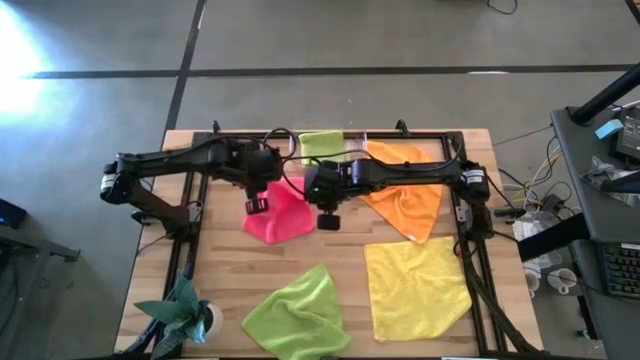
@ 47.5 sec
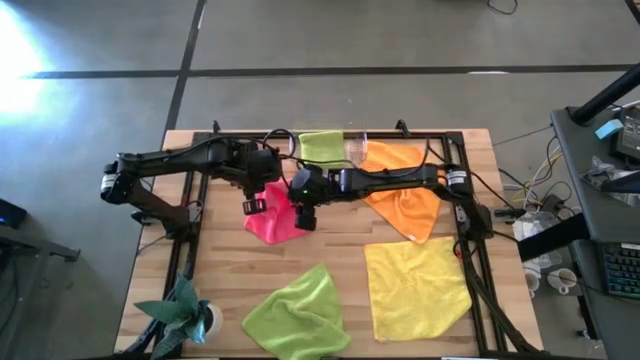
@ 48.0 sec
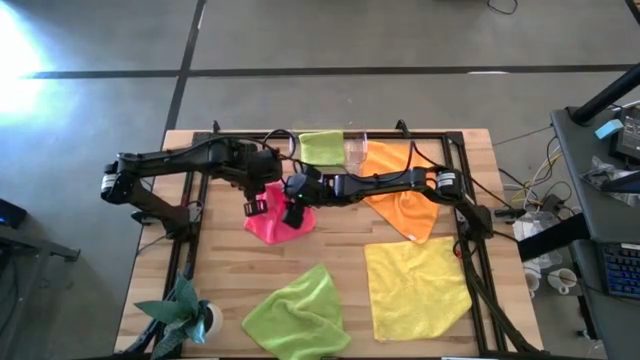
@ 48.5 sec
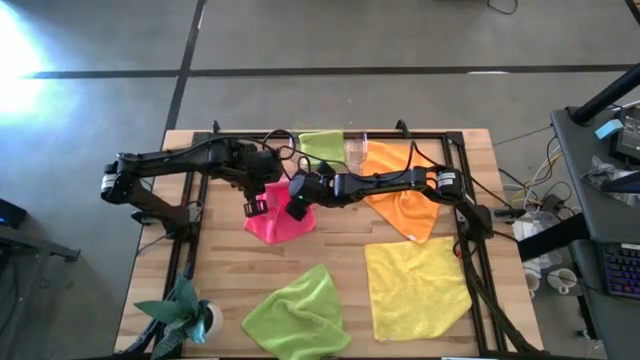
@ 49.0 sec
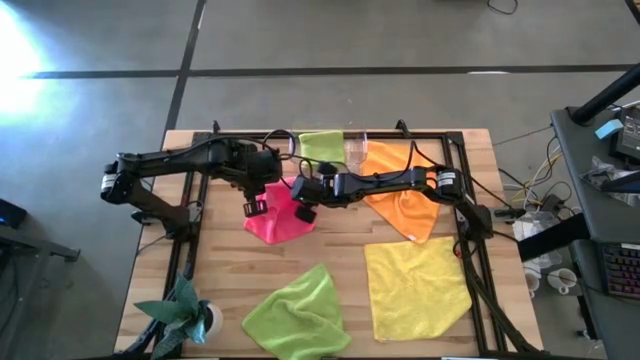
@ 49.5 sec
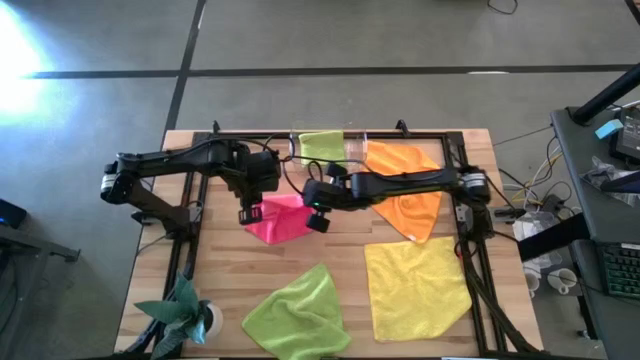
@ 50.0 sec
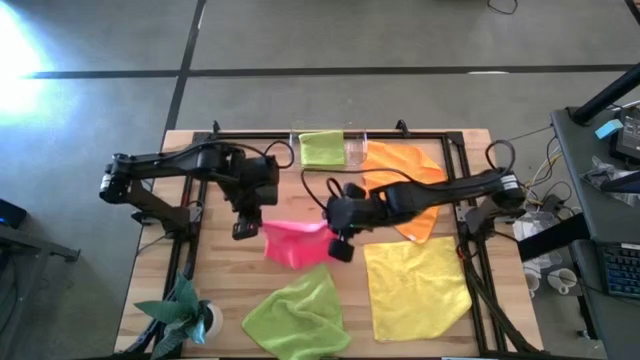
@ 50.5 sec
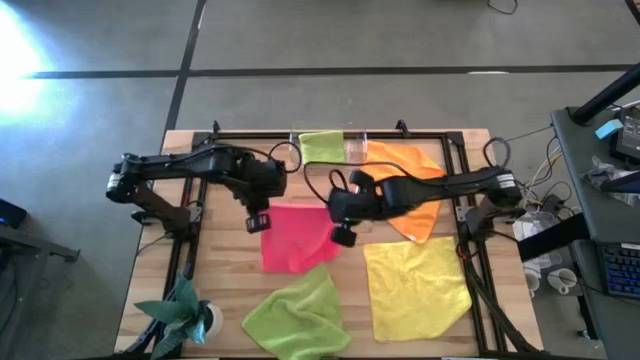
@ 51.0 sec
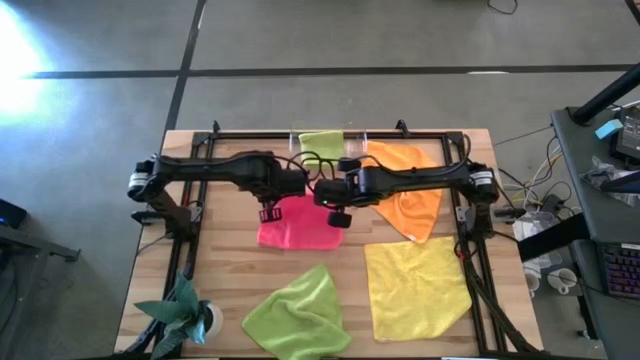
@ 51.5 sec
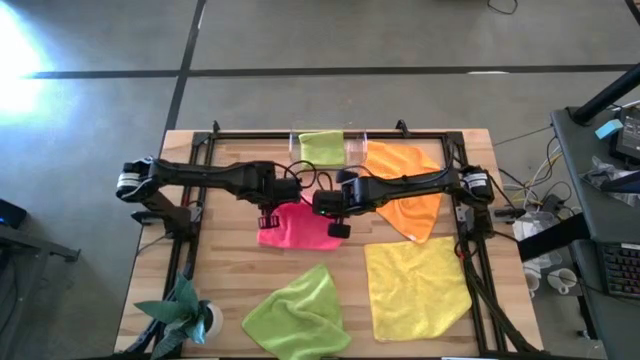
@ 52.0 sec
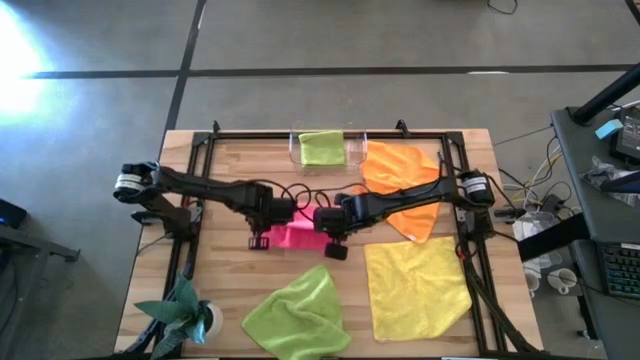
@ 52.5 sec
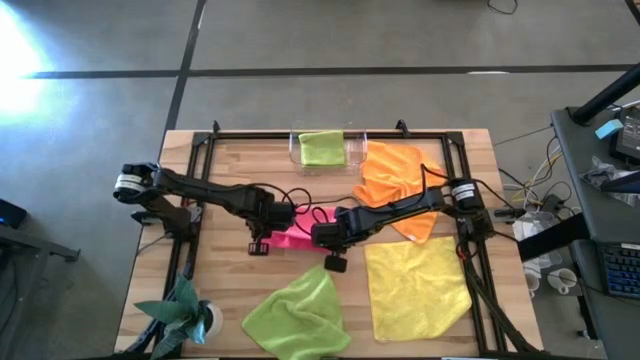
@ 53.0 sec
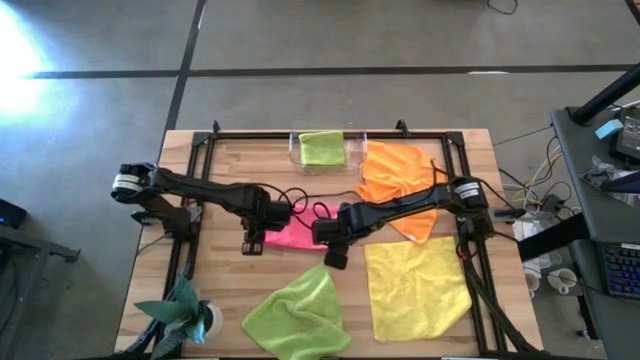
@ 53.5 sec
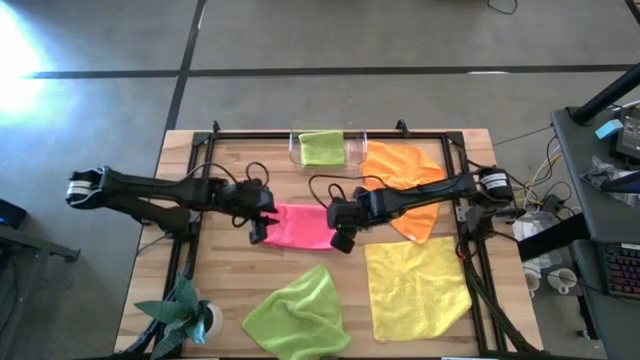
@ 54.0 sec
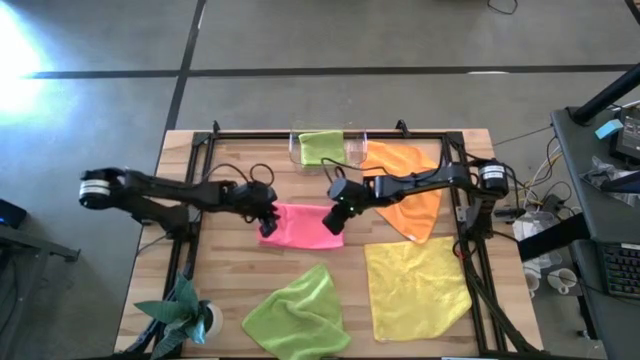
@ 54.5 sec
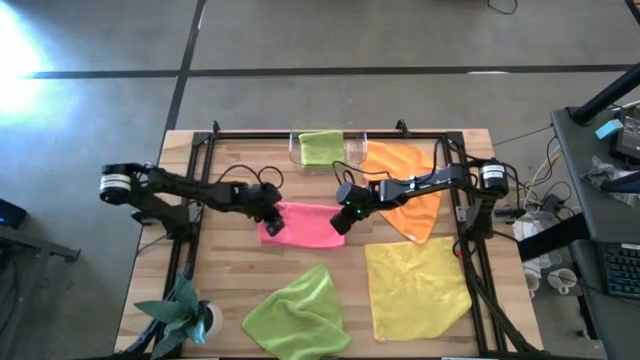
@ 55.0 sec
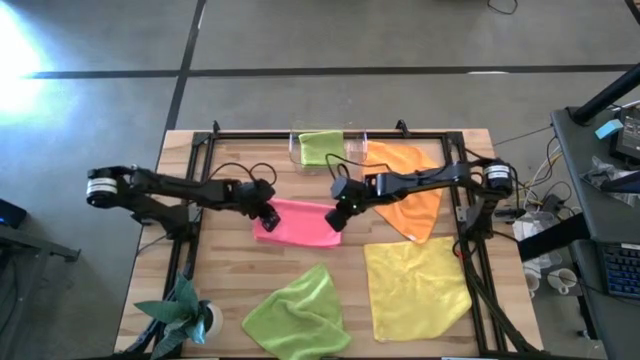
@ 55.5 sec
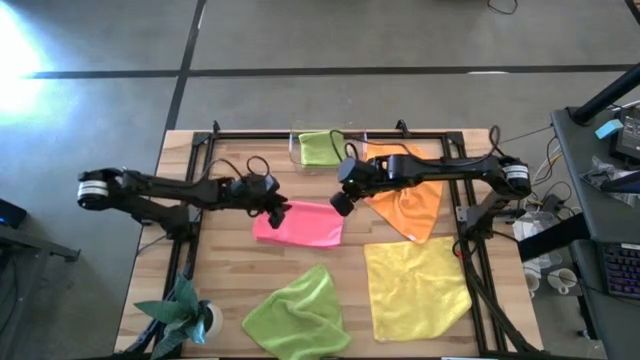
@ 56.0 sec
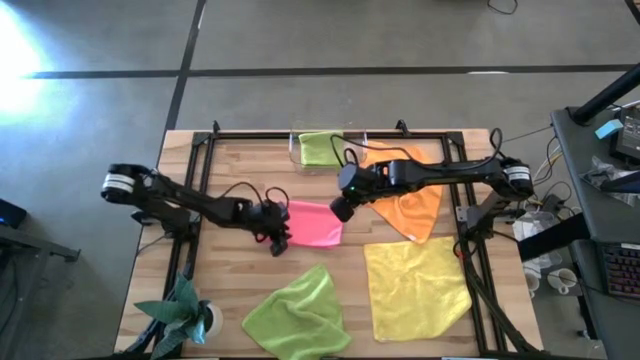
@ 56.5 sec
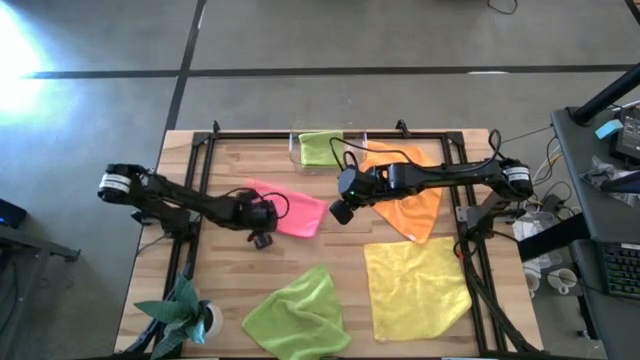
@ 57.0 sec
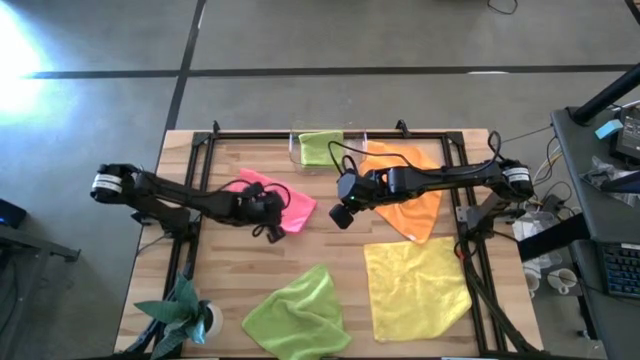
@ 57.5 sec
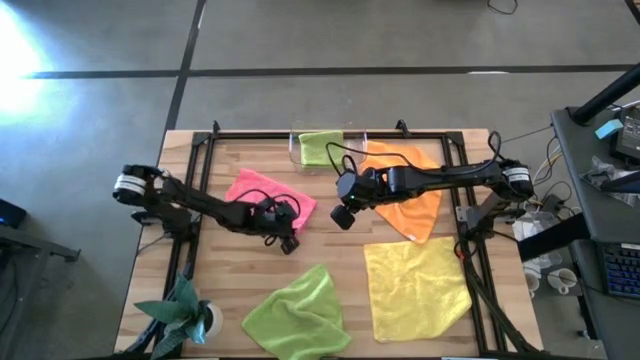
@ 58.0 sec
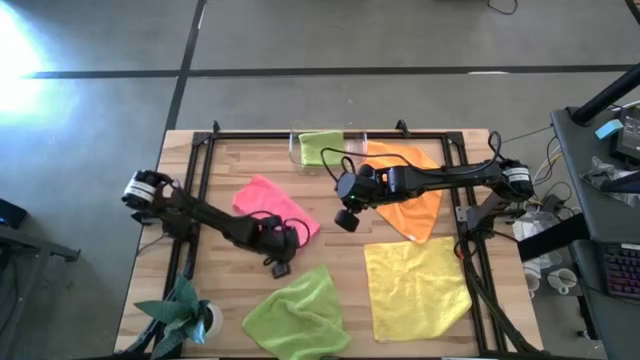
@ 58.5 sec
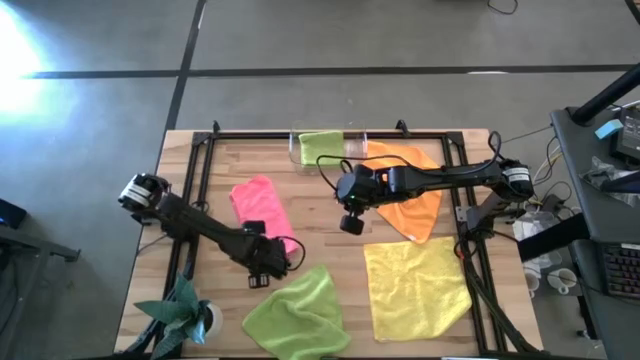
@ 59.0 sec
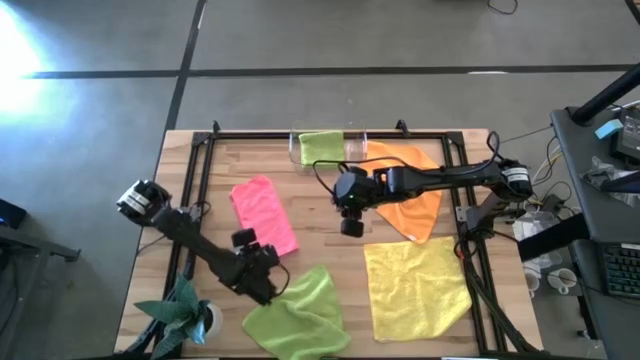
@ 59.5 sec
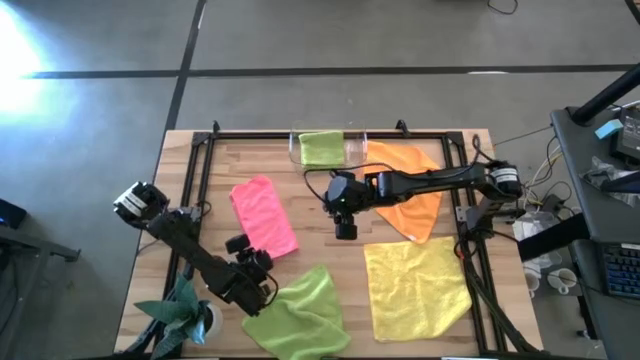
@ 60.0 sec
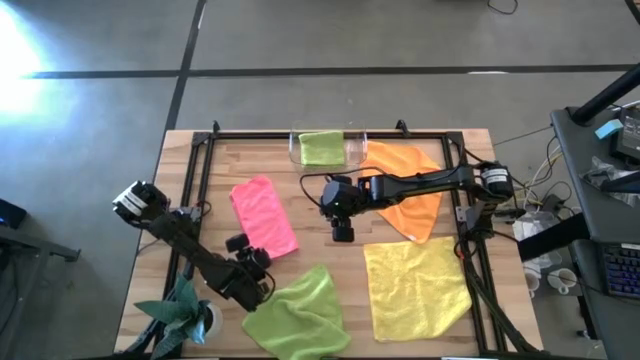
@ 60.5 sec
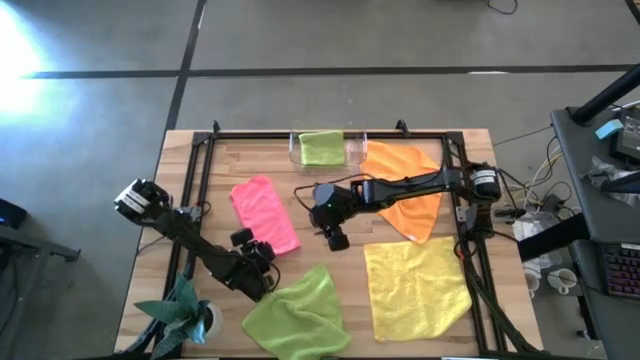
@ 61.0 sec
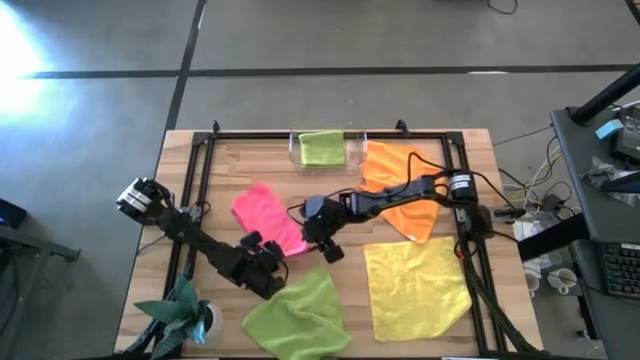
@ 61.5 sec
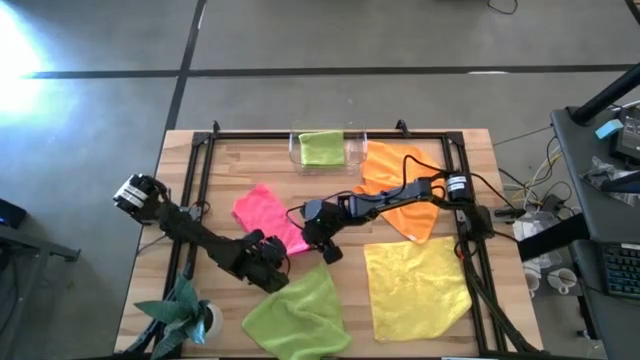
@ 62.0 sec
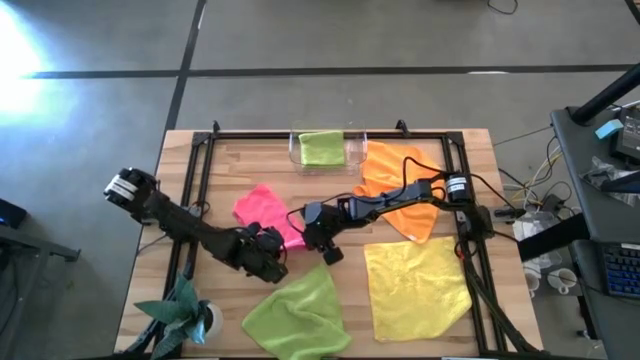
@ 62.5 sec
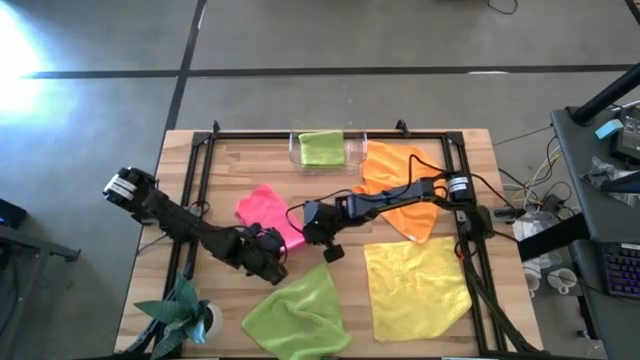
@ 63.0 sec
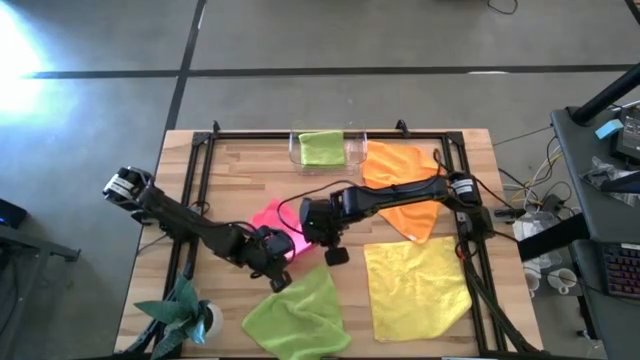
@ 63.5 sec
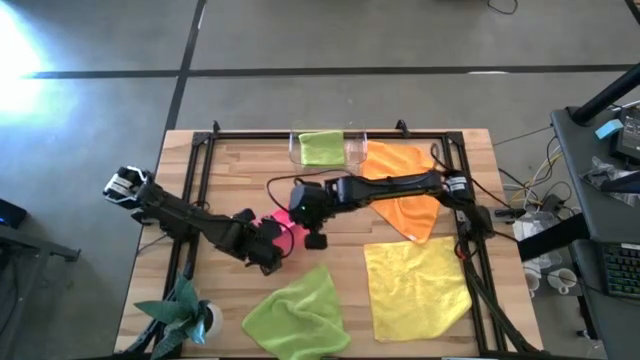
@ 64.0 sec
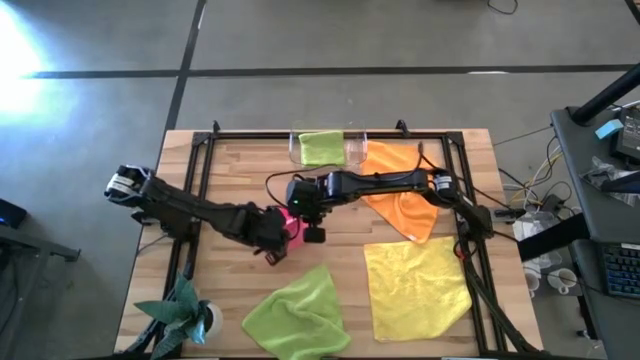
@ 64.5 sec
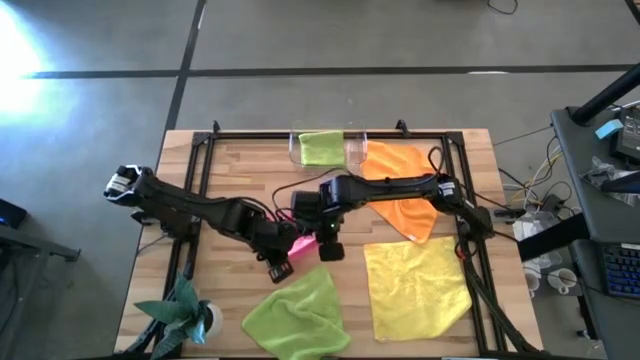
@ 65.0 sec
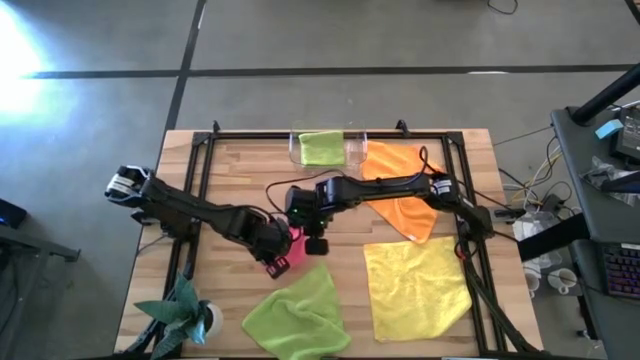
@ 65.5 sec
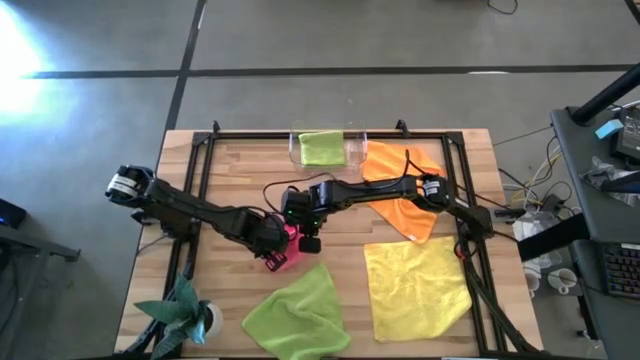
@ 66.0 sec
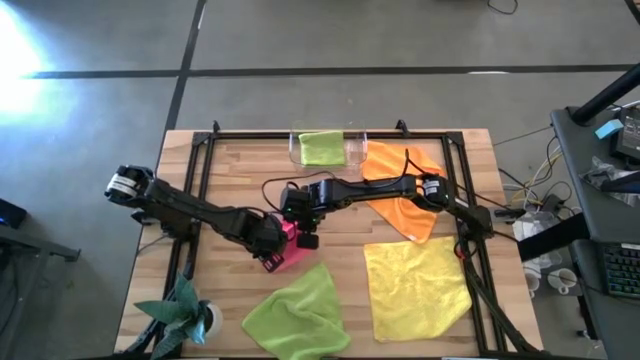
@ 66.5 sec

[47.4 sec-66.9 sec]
Task: Fold microfiber towels
Fold the pink microfiber towel

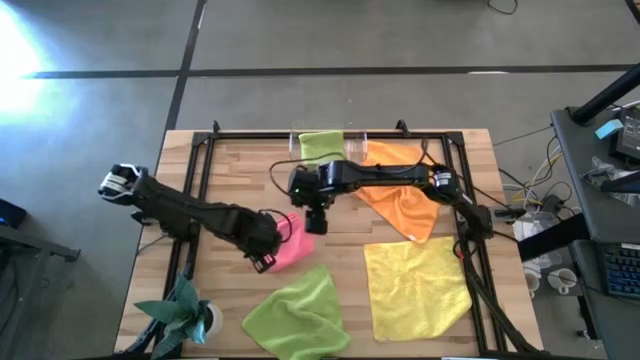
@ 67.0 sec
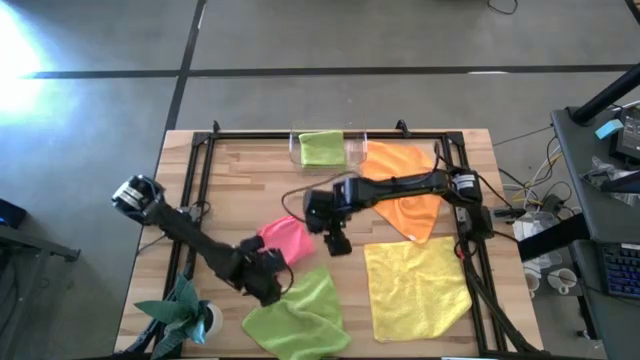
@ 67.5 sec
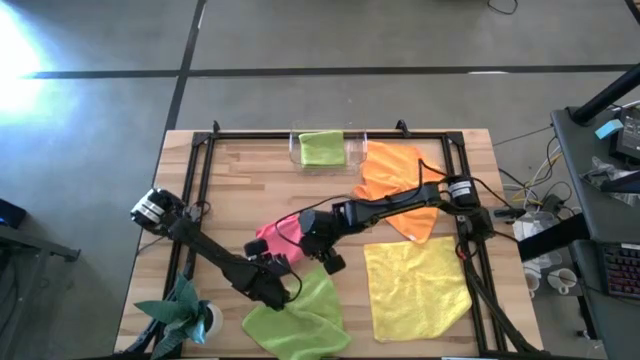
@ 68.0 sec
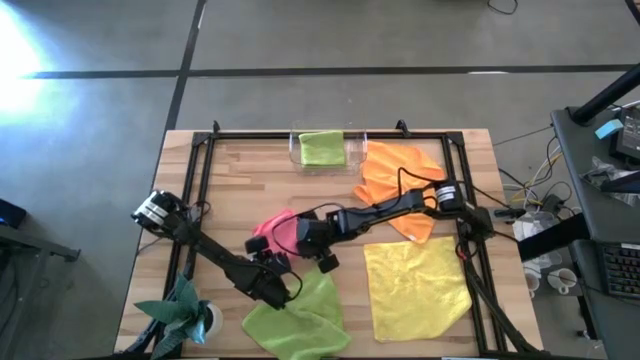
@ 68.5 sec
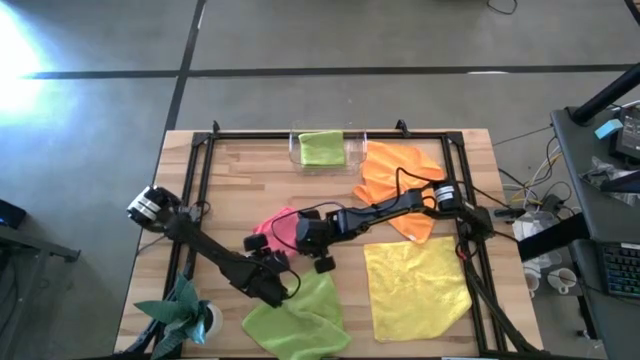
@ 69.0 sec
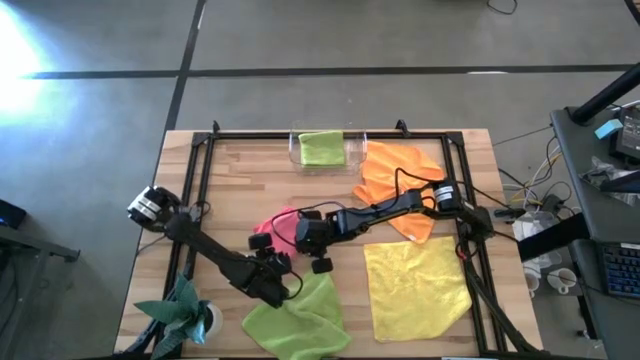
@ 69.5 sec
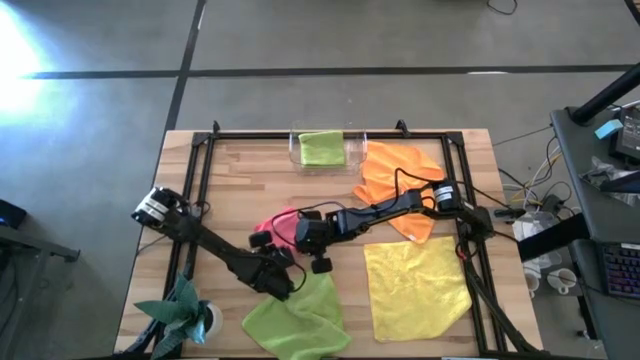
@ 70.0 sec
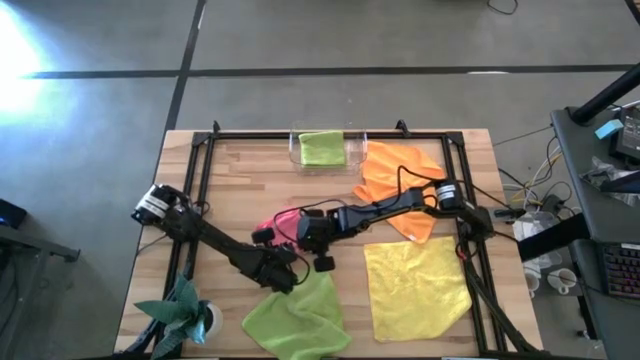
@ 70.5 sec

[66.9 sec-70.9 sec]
Put the pink microfiber towel into the transparent bin
